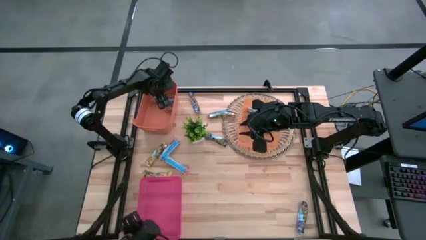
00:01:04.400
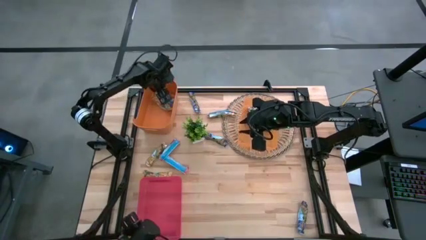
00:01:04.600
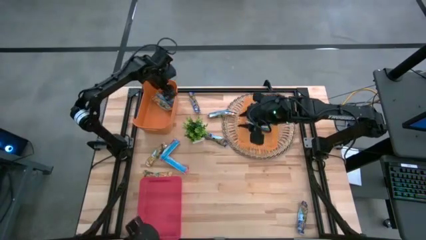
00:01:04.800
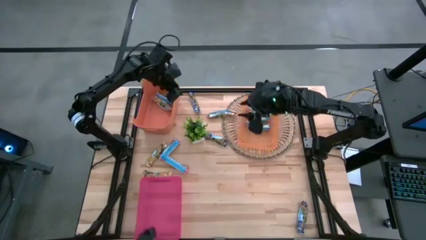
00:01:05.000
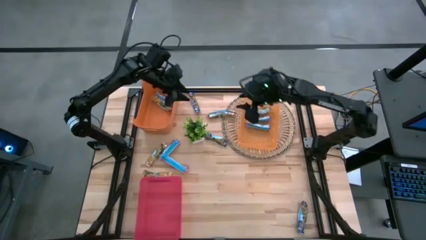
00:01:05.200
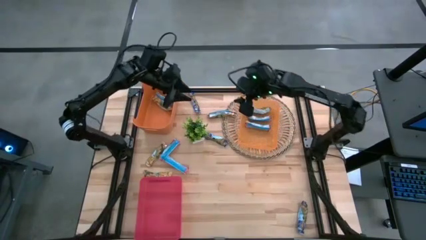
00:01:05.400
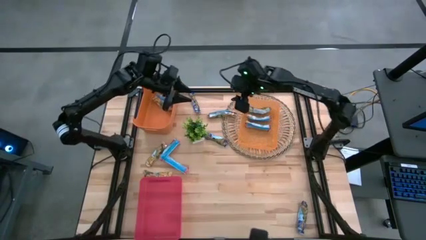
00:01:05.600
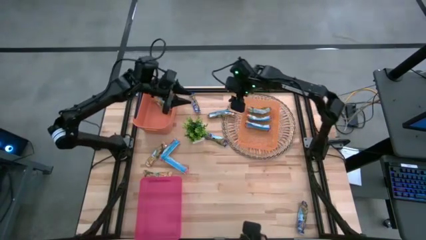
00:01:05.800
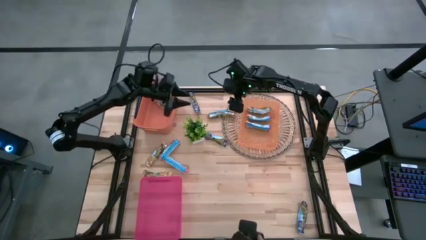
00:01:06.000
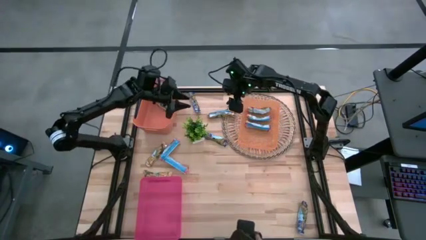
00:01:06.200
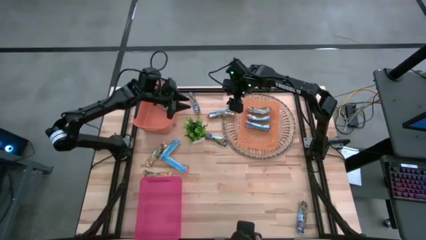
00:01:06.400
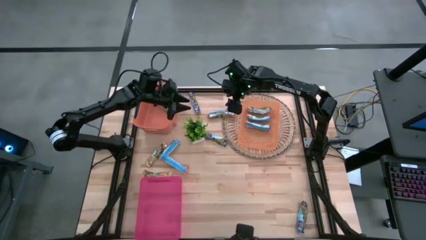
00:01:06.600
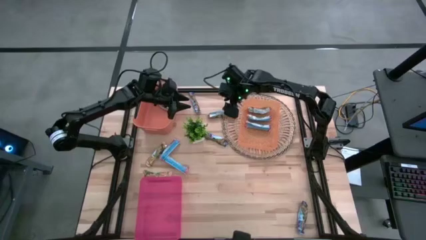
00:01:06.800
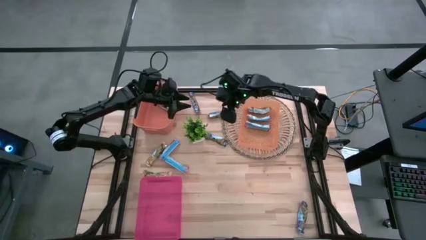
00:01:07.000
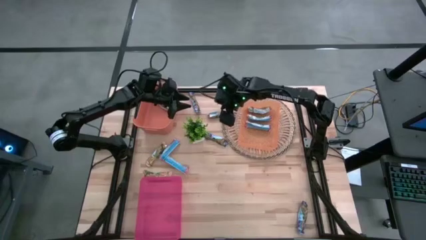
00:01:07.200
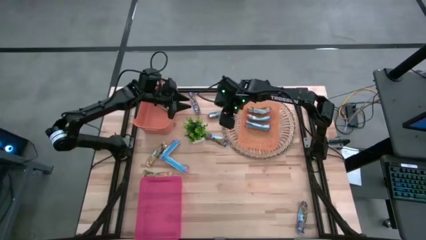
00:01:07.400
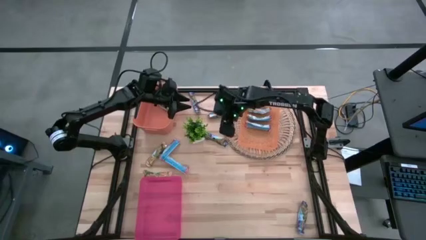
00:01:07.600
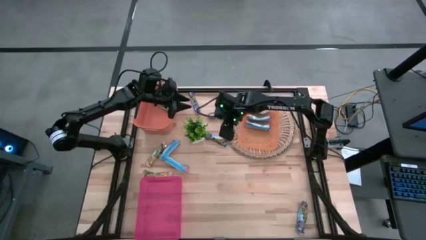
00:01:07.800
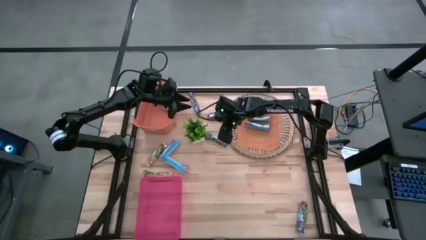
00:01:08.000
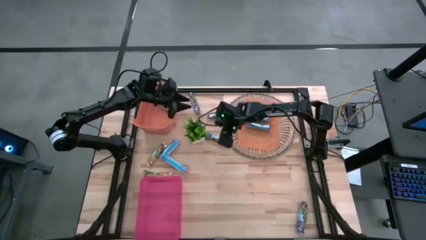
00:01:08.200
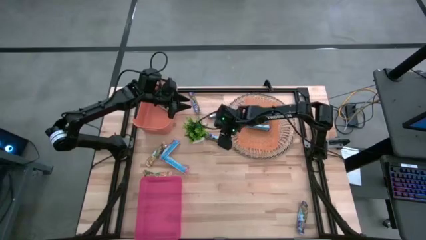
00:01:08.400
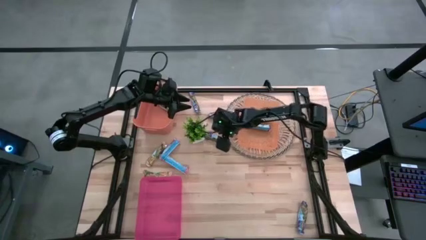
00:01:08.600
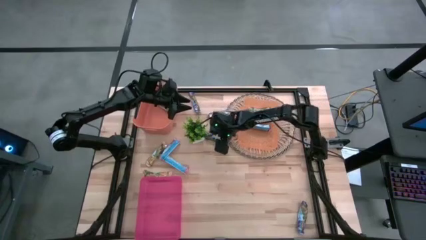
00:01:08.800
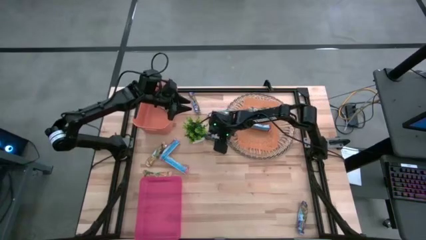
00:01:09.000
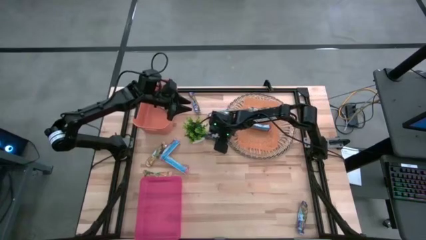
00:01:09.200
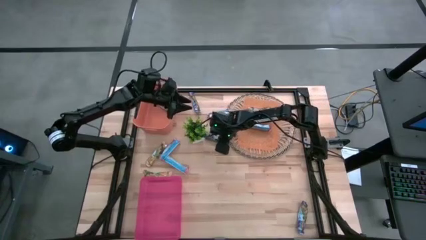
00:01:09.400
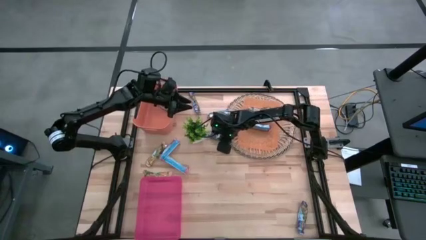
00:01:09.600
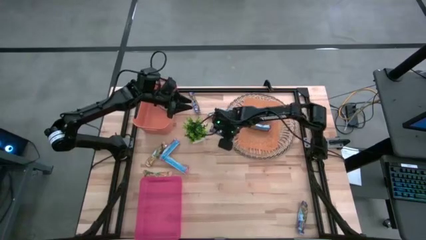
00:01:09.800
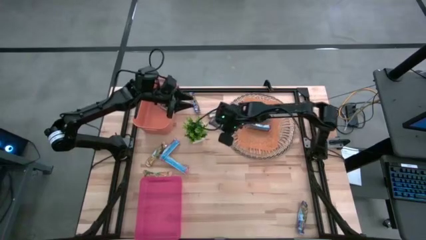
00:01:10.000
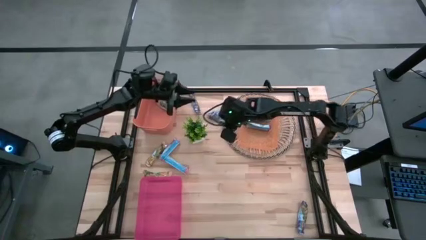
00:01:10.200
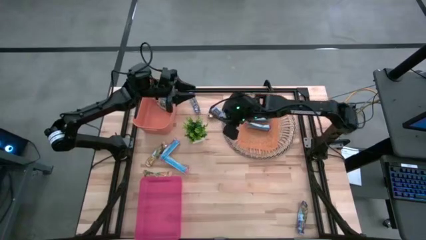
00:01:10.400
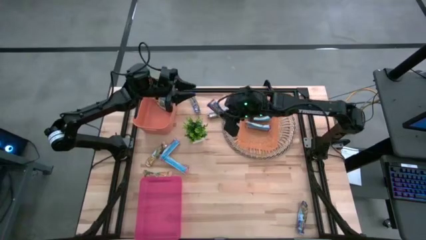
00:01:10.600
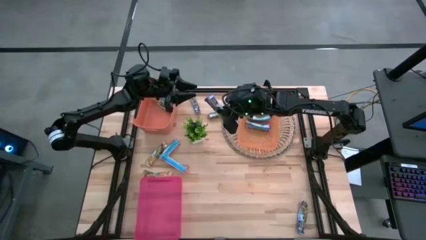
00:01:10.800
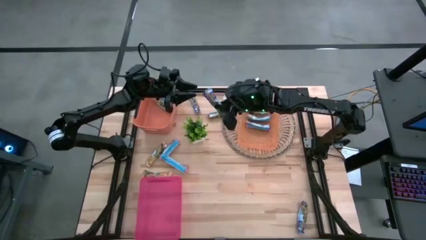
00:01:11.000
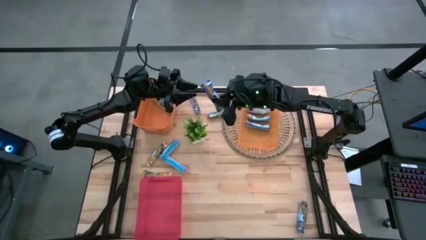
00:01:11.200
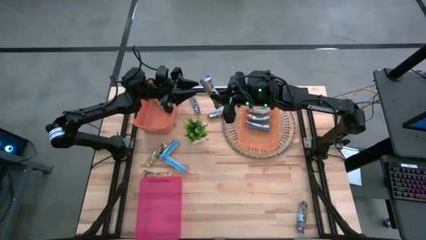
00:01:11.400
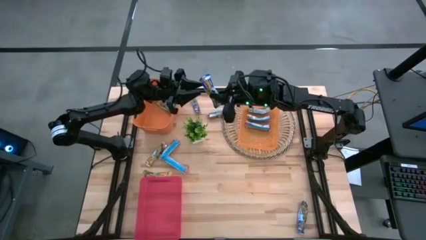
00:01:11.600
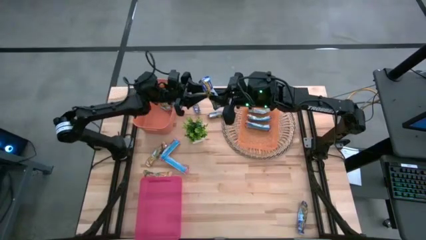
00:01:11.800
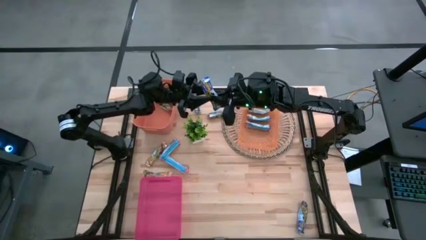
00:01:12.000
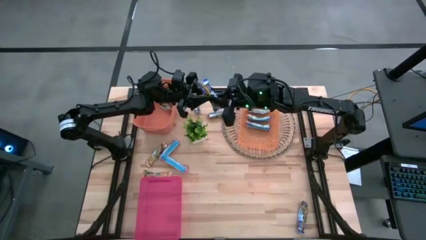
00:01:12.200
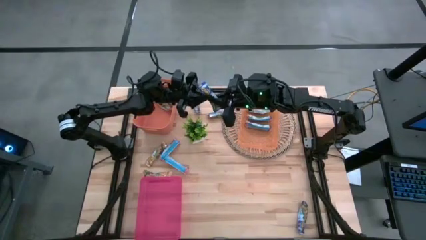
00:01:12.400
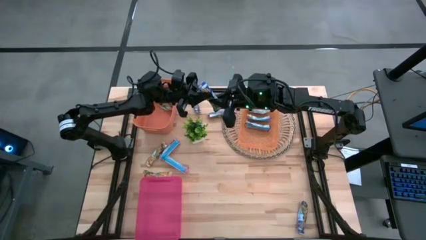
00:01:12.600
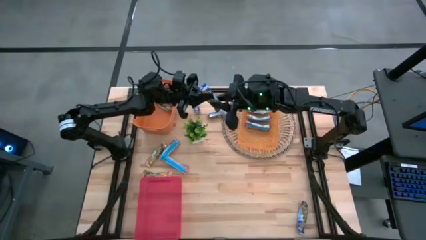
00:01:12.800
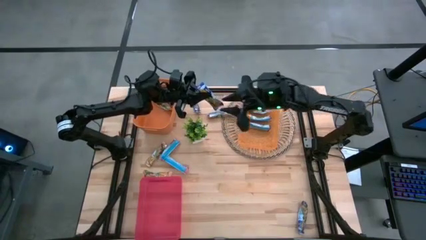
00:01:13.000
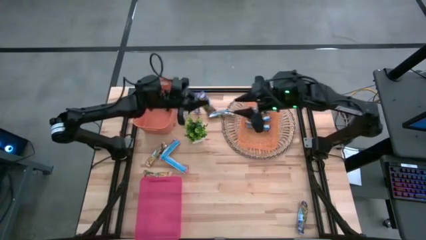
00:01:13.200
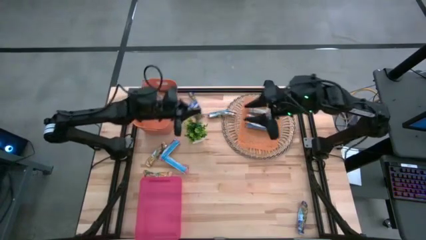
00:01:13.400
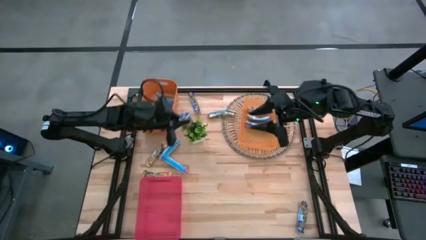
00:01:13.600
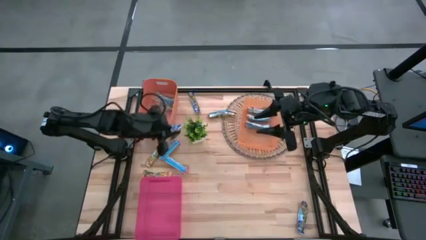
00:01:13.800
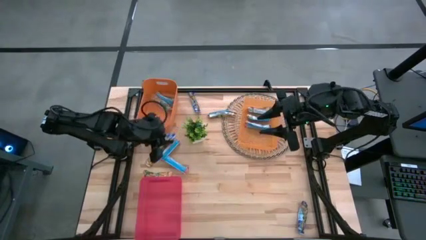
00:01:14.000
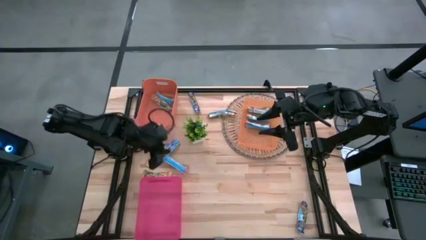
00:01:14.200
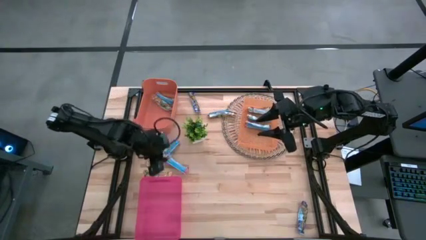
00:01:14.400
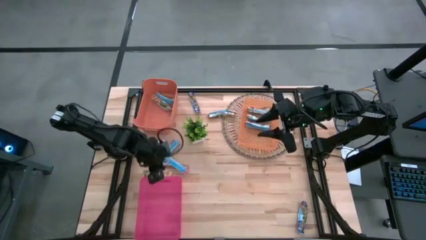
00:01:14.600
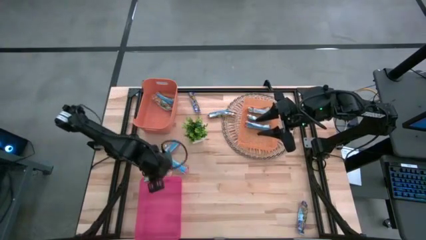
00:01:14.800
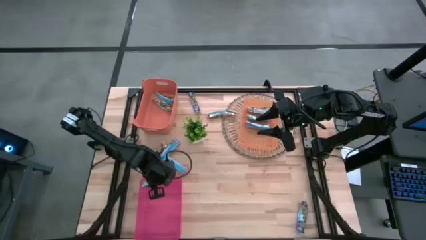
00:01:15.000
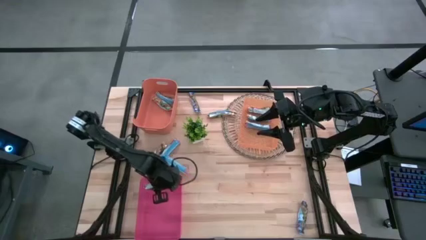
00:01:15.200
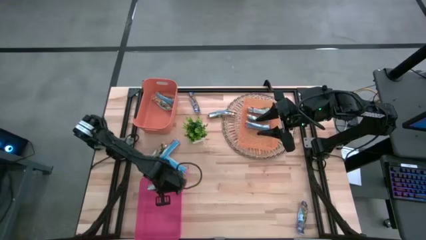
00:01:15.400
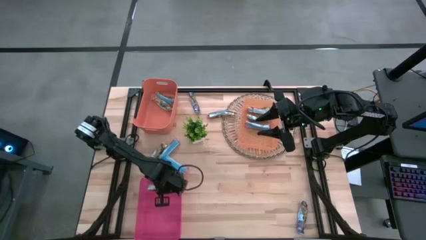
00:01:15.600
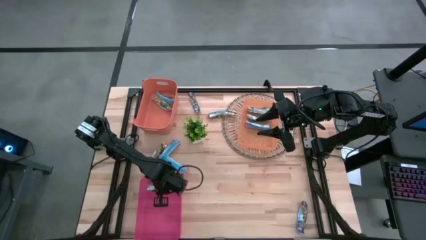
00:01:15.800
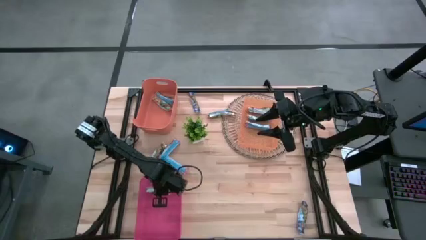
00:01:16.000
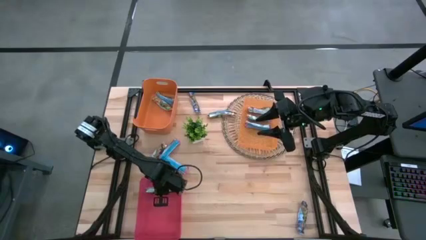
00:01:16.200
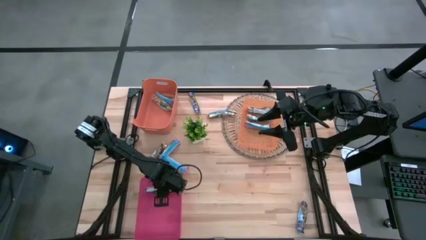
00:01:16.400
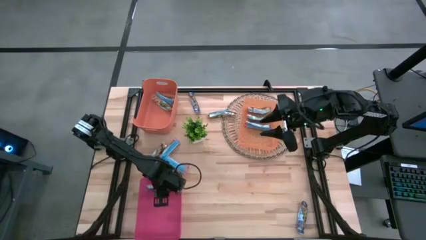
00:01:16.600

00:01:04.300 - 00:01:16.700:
Task: Pick and place Granola Bars by type
Put the middle blue granola bar into the pink bin
